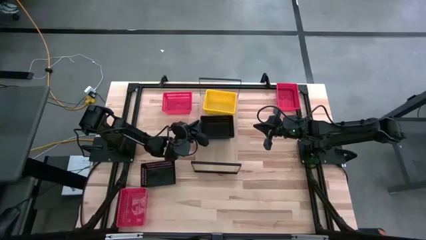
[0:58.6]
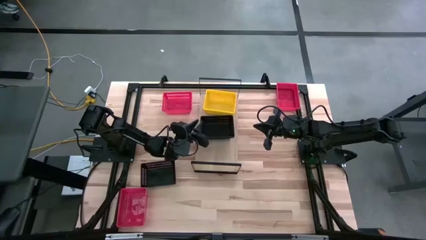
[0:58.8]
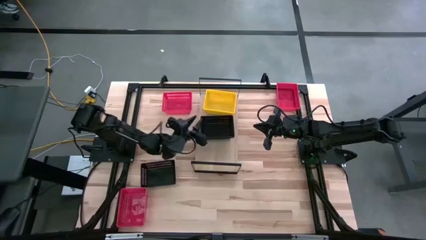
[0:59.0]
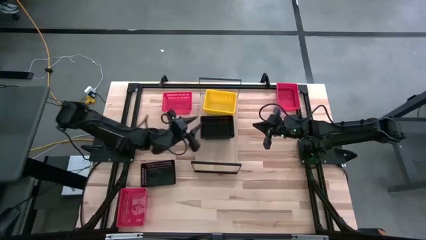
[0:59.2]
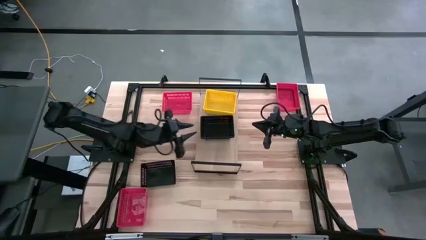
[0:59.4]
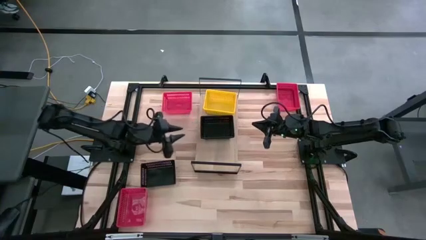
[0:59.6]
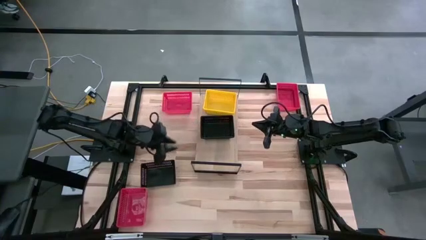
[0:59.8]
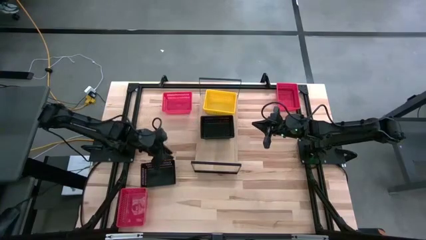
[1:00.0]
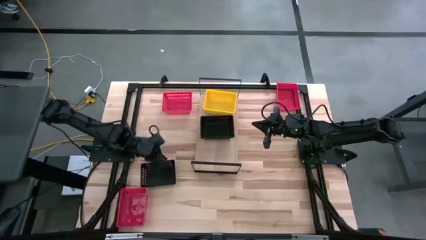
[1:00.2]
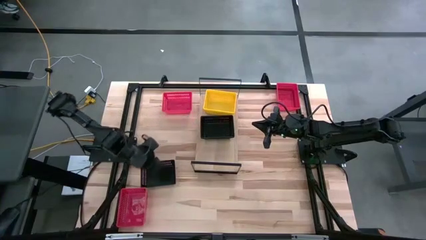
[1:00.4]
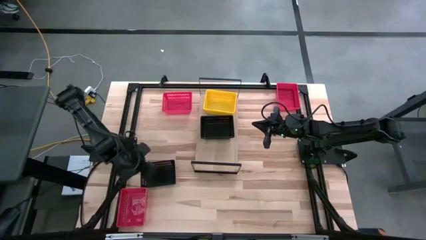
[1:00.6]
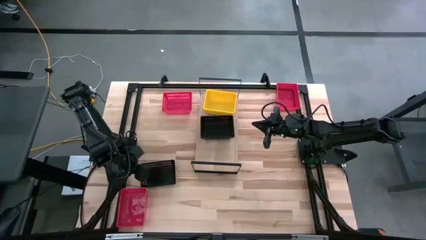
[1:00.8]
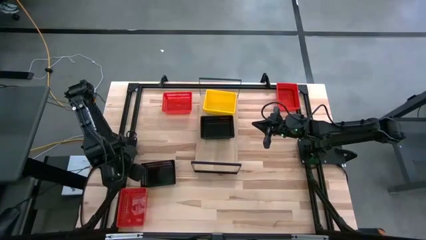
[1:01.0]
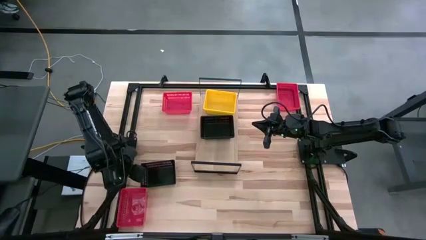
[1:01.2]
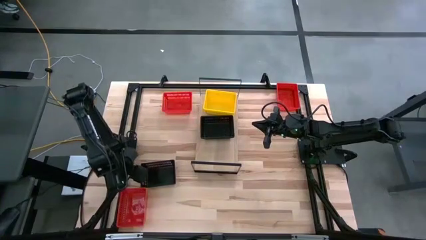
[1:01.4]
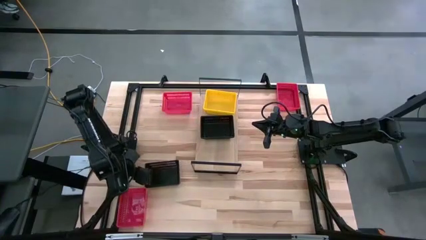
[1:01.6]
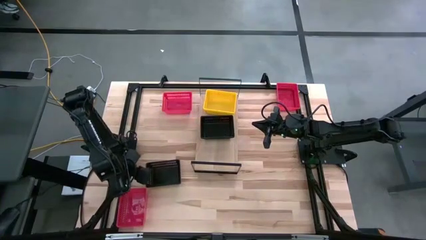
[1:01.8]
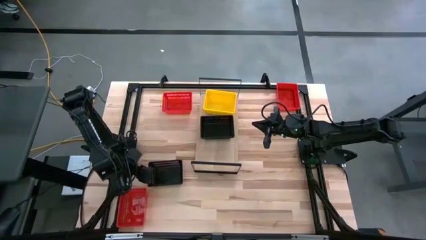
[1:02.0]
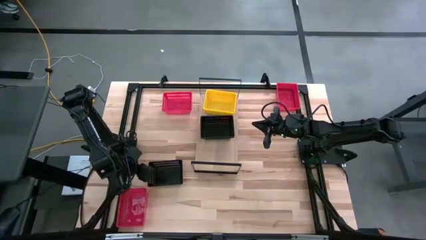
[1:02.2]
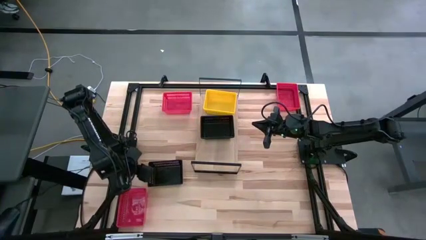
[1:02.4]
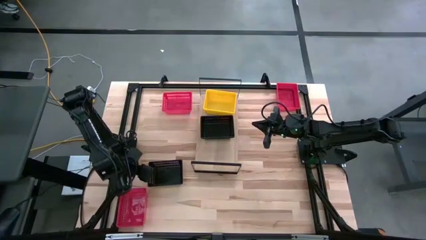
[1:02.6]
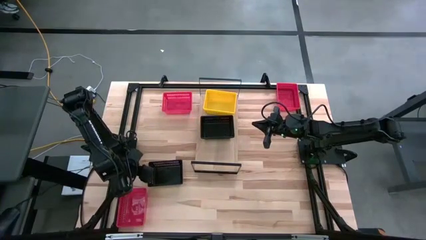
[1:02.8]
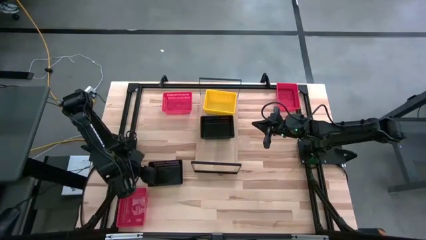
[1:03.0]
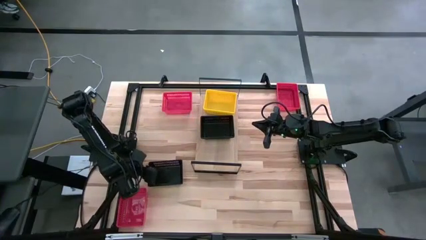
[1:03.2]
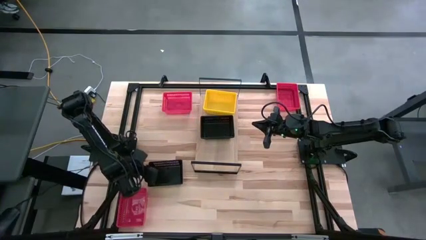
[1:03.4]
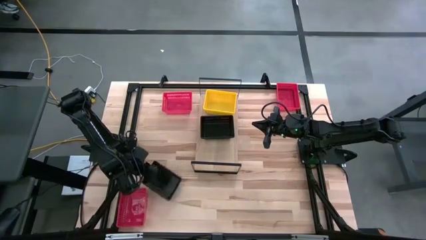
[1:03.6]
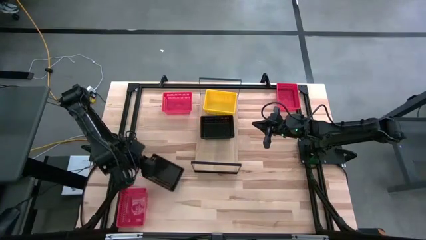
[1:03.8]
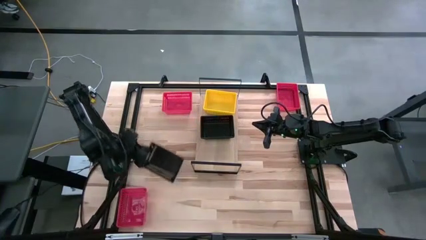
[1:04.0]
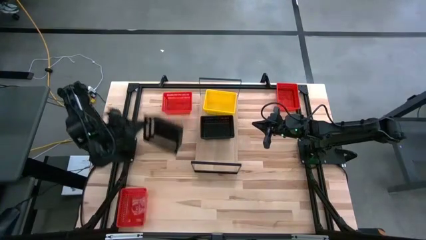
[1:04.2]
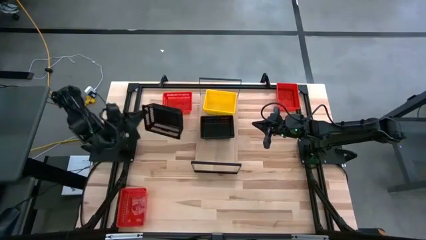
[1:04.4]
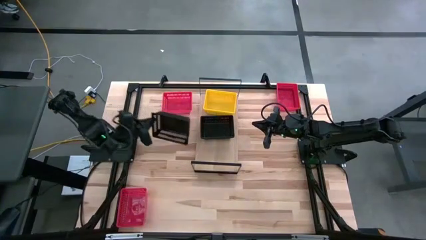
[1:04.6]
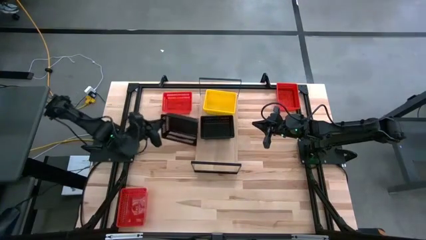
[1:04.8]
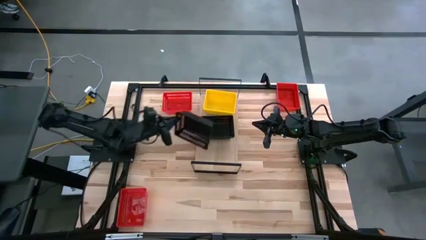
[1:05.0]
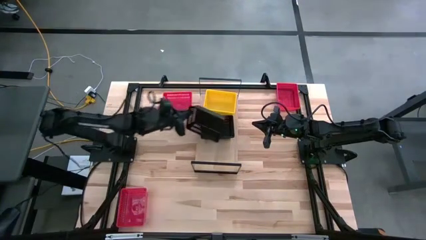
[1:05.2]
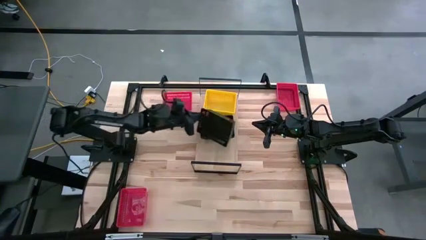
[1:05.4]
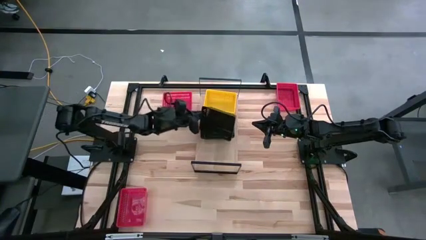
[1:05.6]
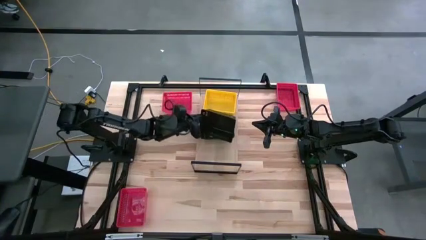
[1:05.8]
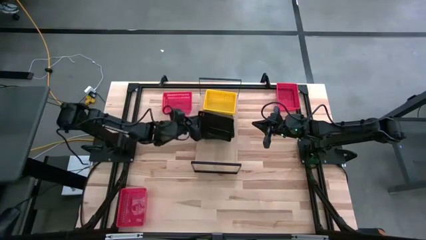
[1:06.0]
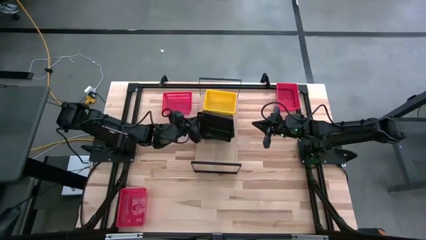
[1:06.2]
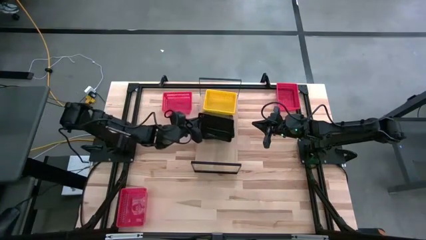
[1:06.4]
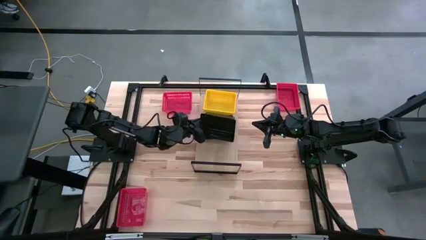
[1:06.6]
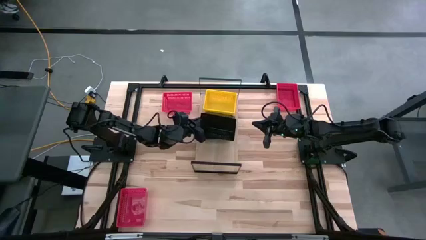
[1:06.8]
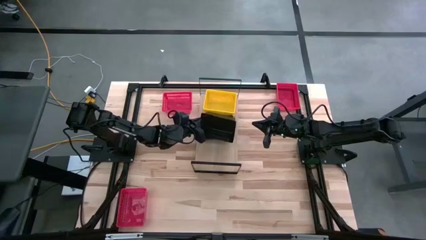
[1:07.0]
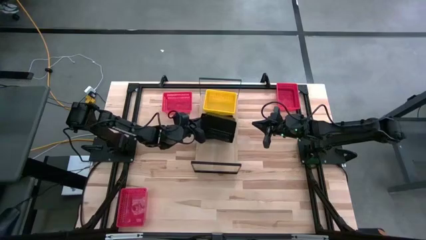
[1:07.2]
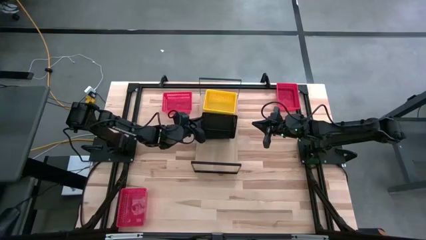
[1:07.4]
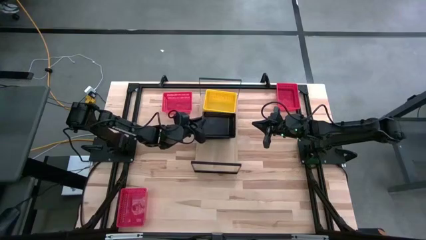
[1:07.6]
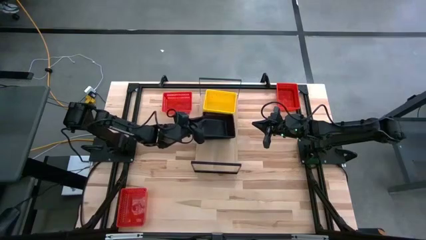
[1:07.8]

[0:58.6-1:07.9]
Task: Stack baskets on shelf by color
Stack the black bin on the black bin on the shelf

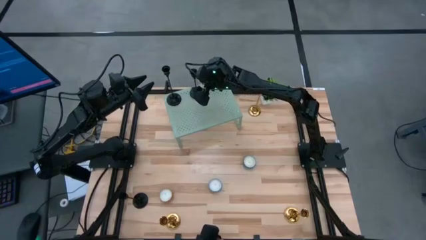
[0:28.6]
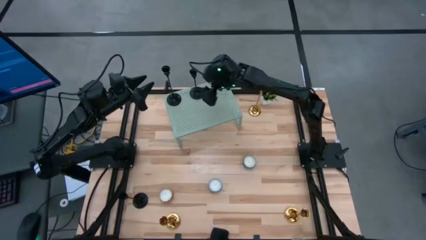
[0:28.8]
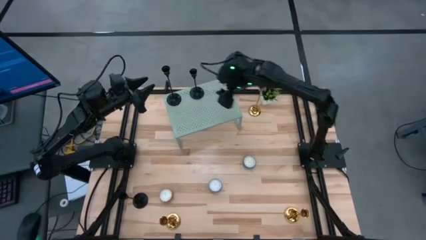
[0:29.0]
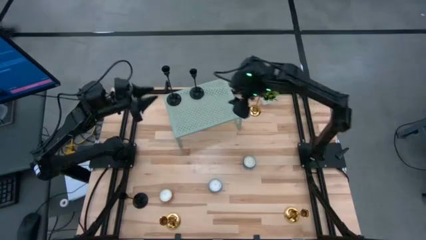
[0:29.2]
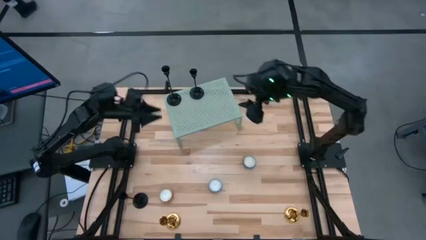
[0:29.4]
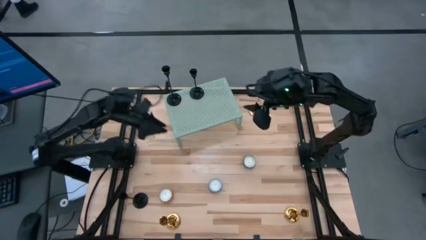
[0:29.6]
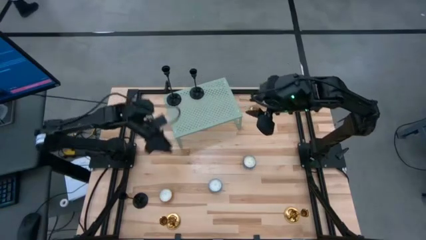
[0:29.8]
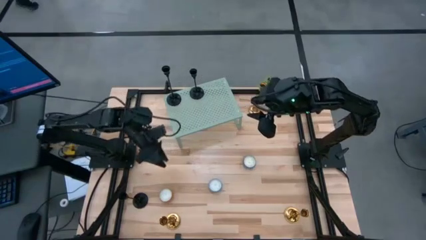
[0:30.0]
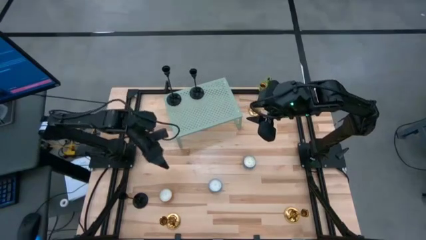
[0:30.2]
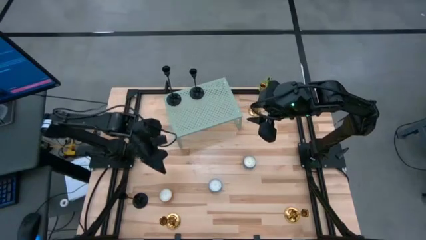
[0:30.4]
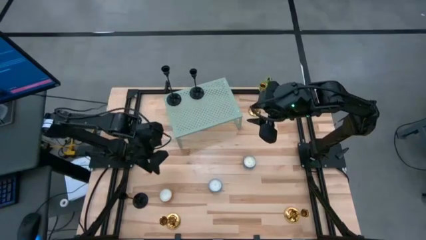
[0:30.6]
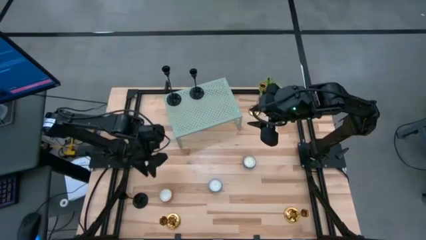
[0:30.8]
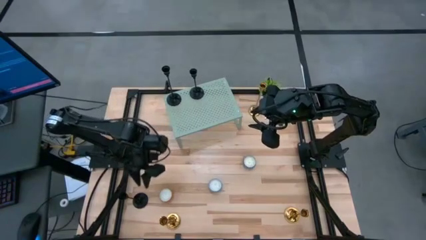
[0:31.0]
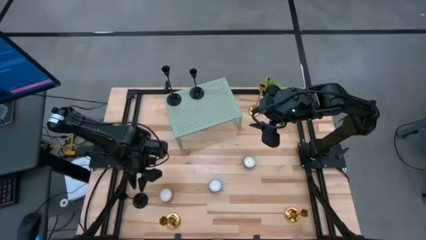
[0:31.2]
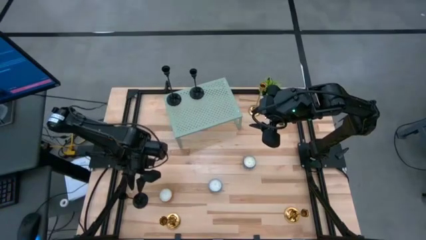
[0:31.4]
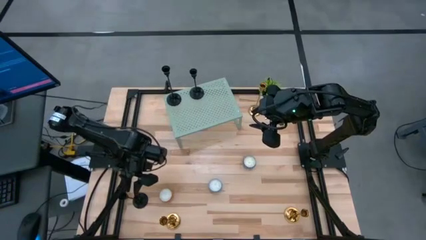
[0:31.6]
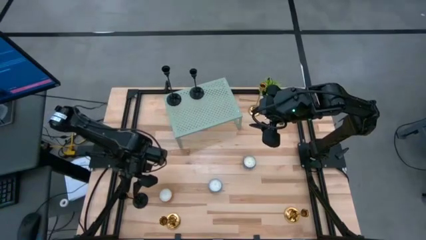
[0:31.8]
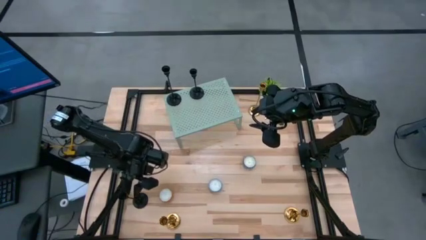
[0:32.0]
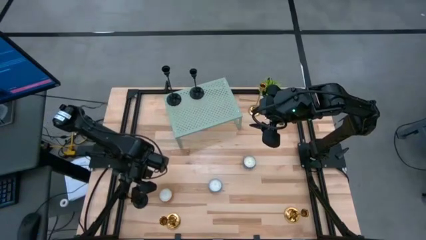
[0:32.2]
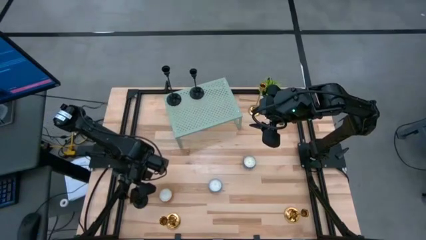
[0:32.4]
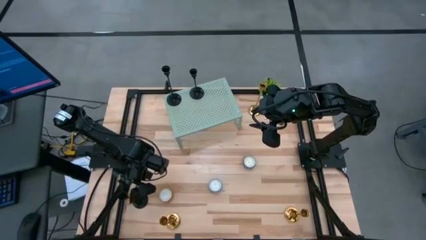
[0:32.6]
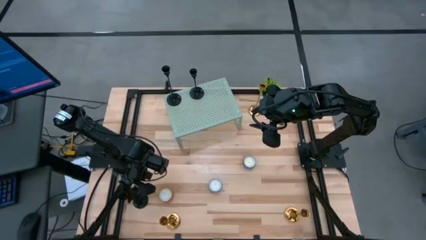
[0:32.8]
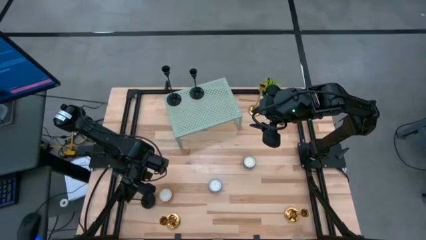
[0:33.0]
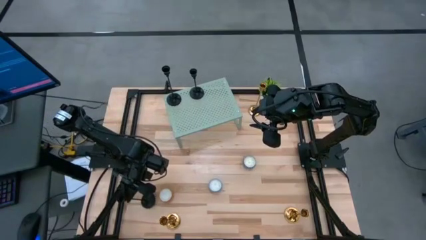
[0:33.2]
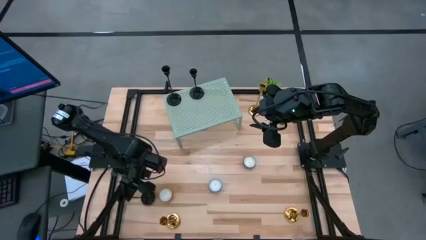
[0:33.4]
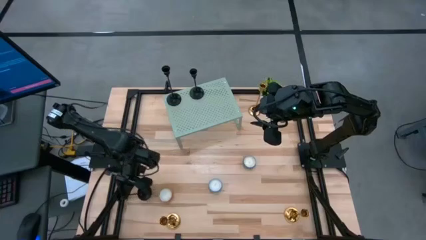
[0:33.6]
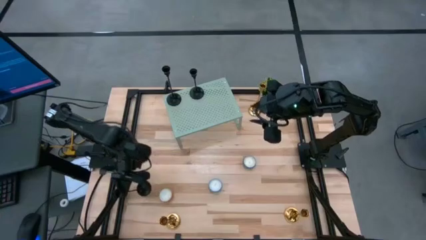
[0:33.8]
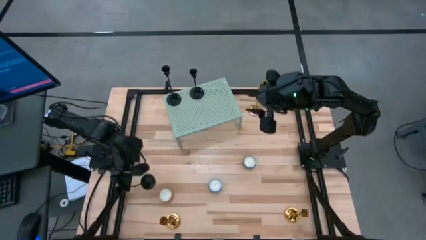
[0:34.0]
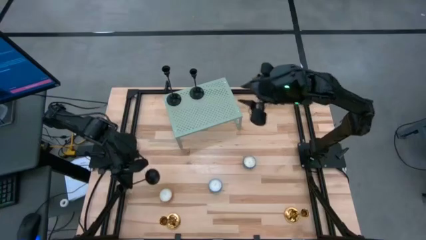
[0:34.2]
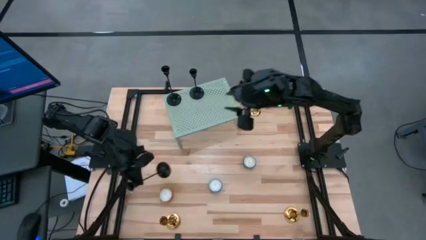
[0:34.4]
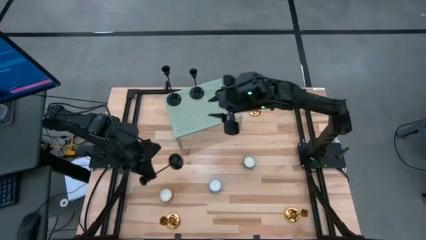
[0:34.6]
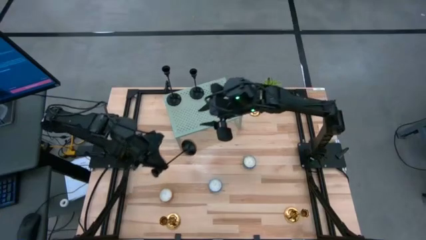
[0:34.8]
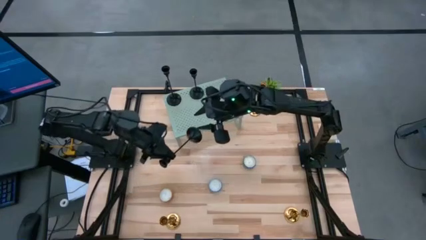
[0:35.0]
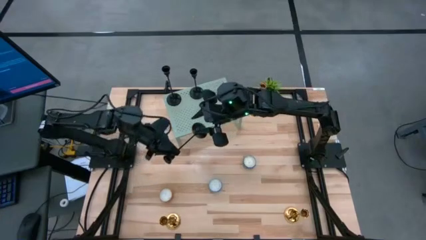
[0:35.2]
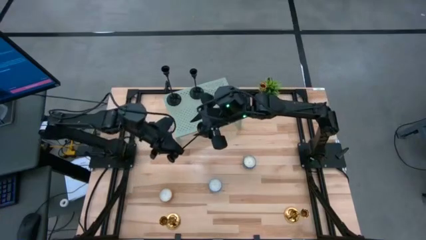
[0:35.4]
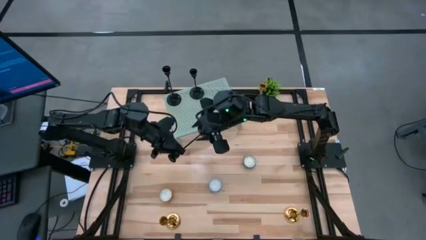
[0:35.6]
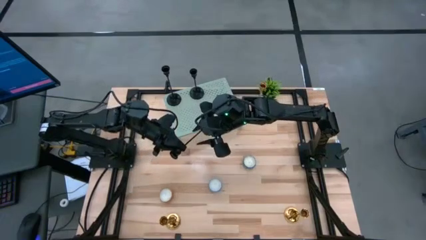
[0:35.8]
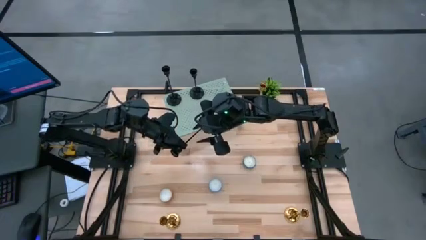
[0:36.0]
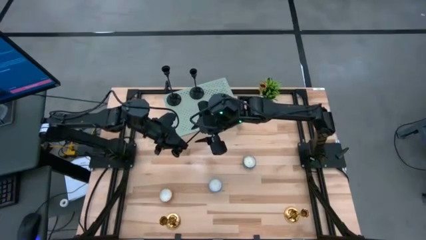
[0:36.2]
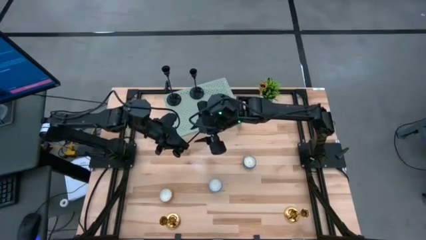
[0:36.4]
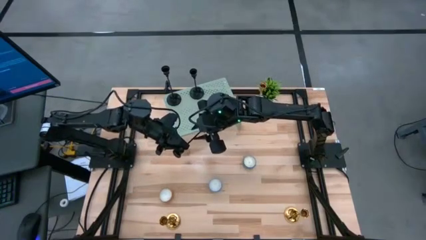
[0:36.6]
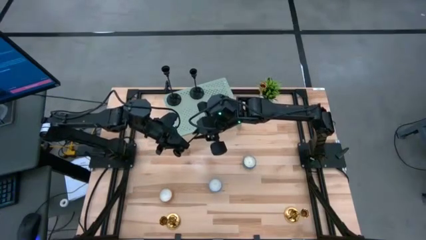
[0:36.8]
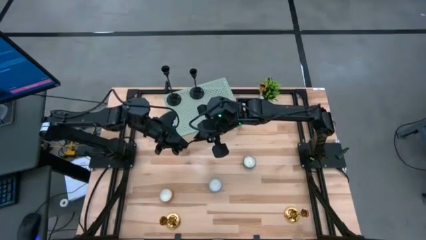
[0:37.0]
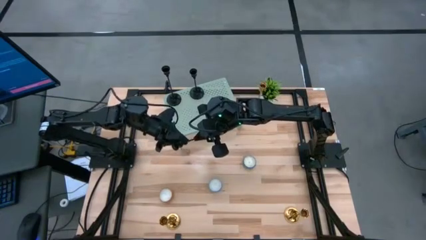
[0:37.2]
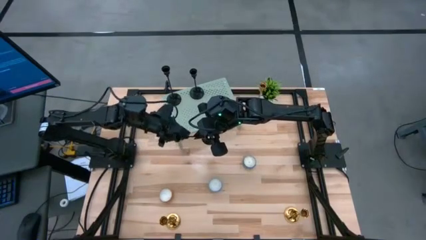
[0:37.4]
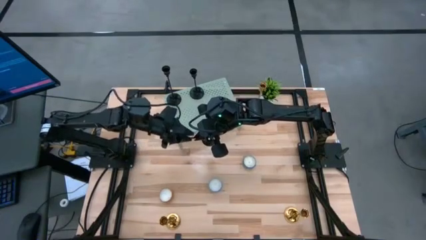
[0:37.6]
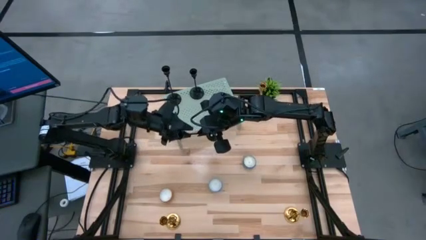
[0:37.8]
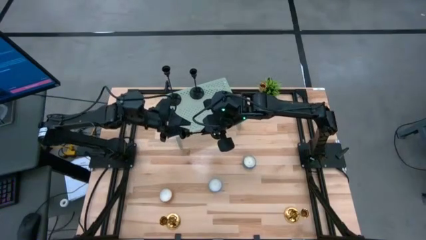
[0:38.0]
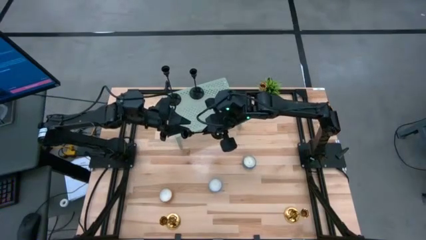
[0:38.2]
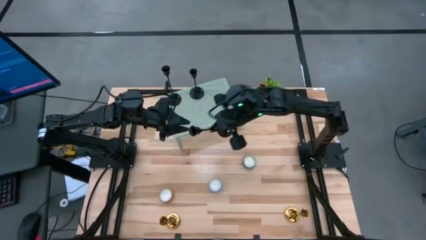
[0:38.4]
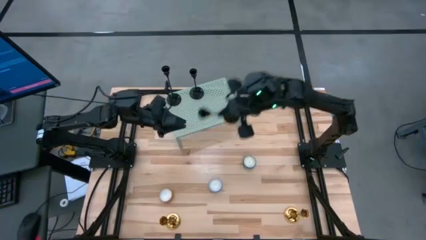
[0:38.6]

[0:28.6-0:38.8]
Task: Pick & Place candle stick holders
Put the black candle holder on the shelf aligned with the other black candle holders
